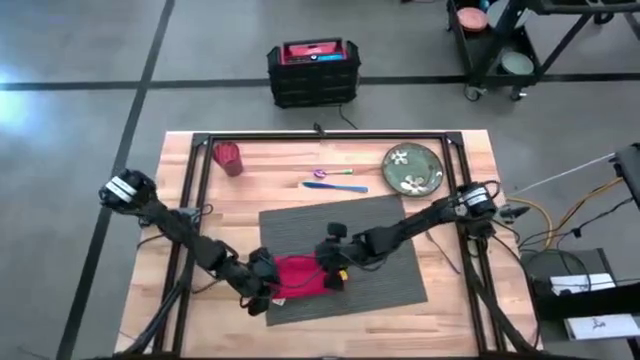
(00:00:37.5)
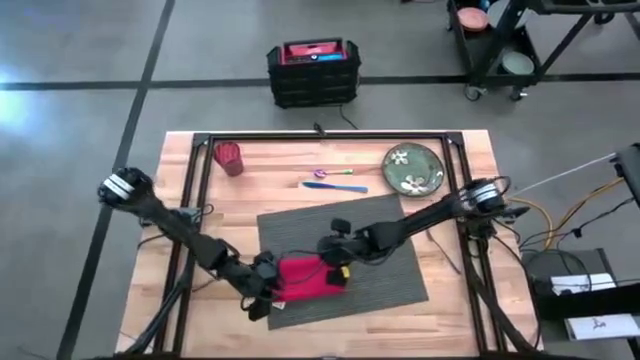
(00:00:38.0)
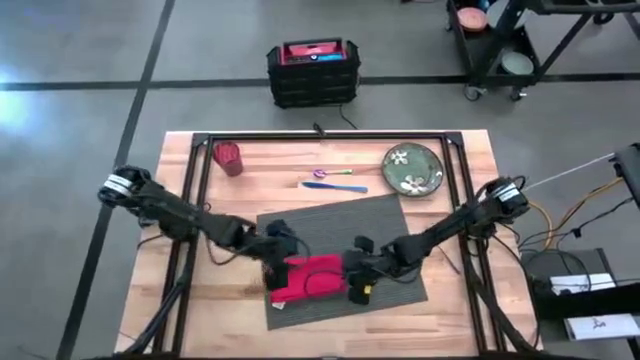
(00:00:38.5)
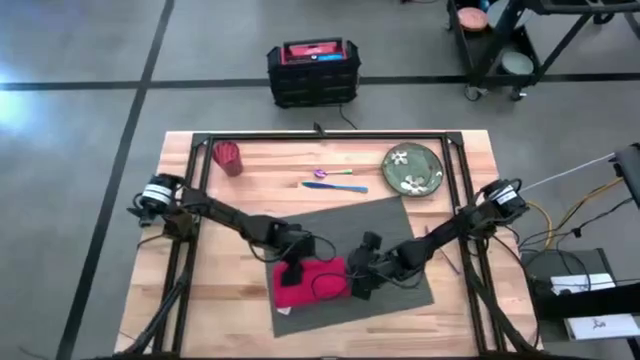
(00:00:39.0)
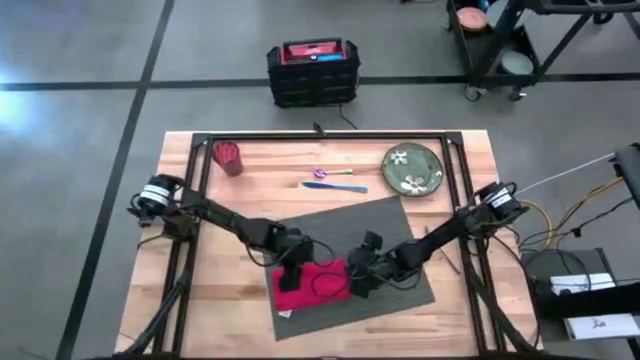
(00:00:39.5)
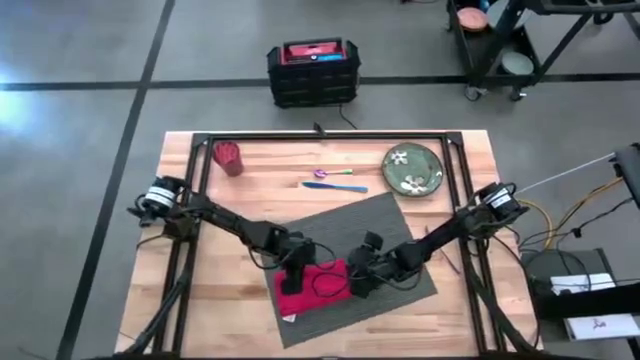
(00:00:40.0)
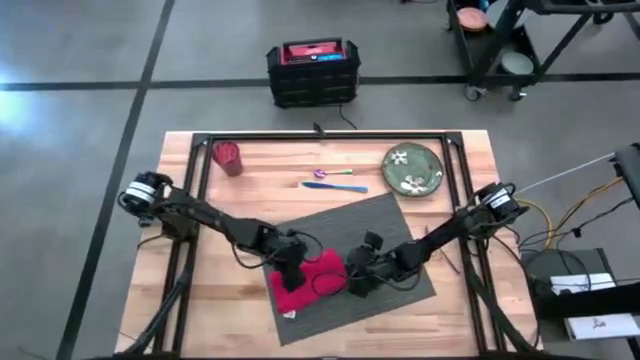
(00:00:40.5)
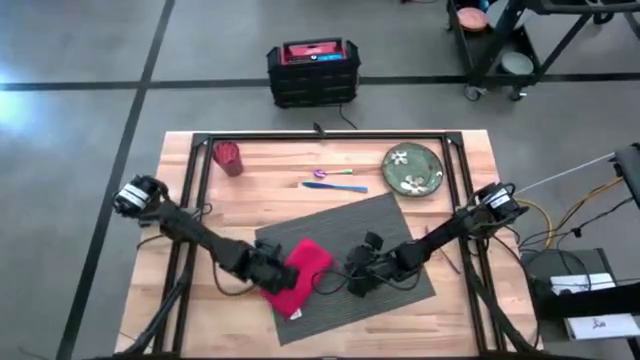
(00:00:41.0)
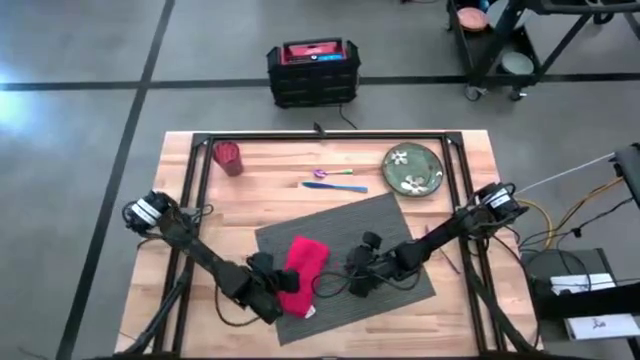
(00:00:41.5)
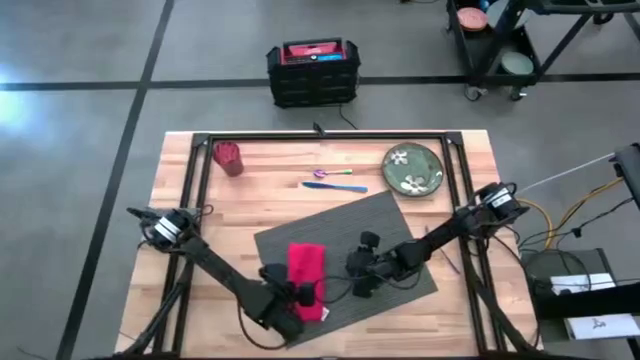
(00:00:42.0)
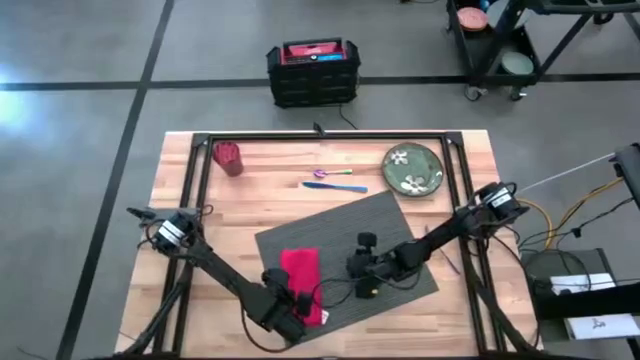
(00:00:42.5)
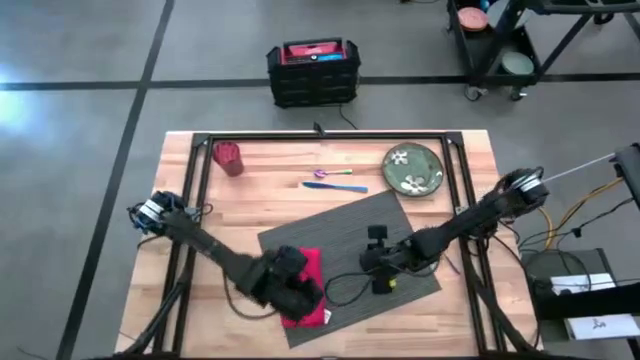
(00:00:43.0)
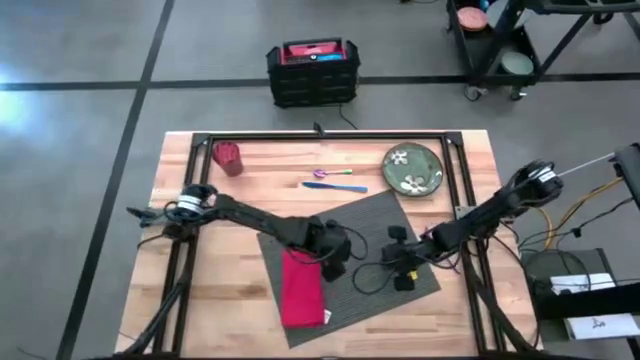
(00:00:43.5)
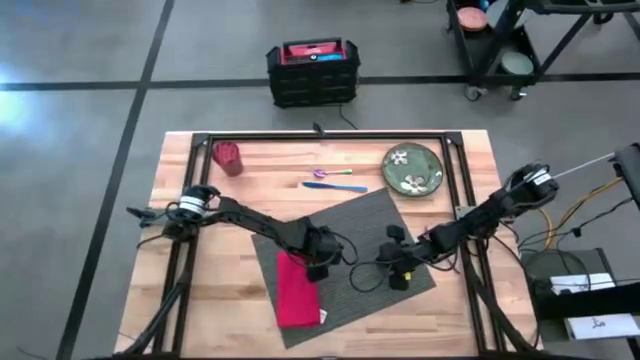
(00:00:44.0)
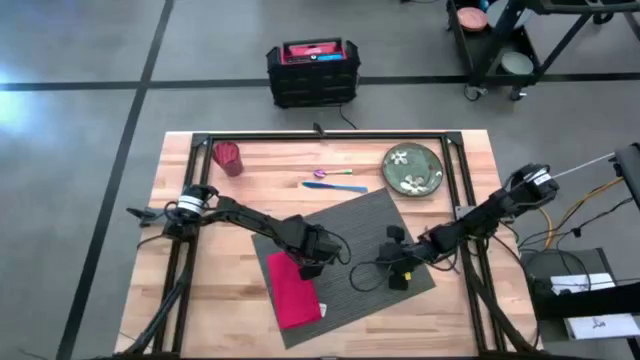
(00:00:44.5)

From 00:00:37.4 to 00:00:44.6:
Task: Set table place
Put the red napkin on the left side of the gray table mat

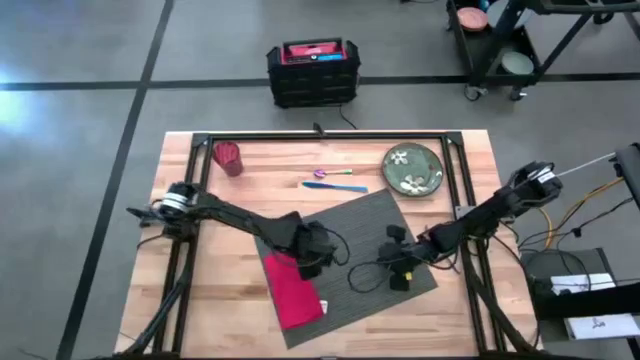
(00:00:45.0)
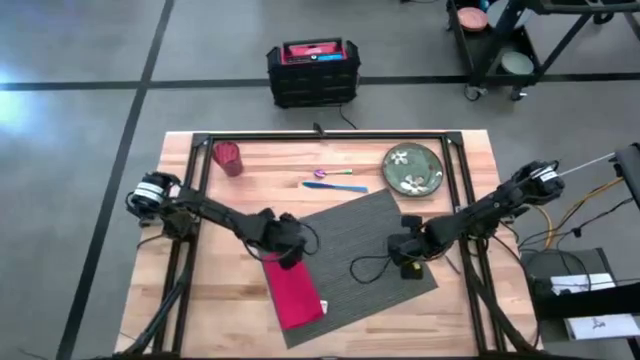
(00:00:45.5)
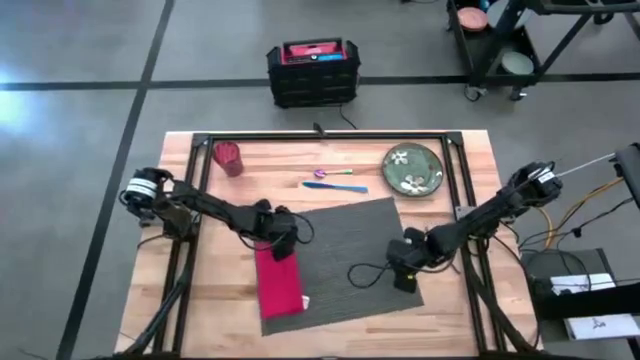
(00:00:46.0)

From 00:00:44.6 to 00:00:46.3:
Adjust the gray table mat on the table

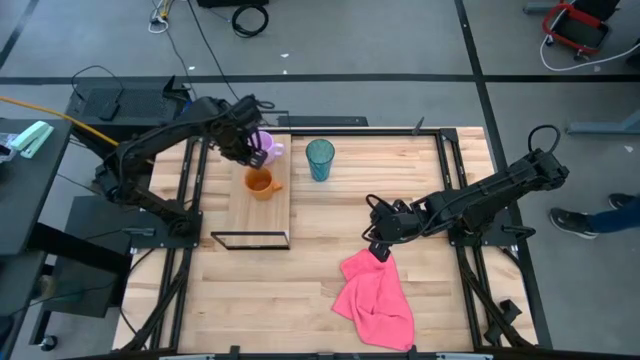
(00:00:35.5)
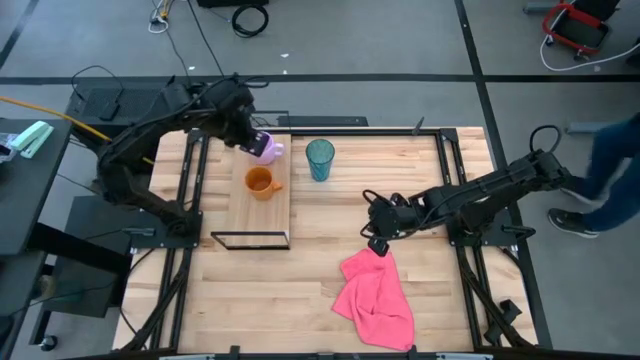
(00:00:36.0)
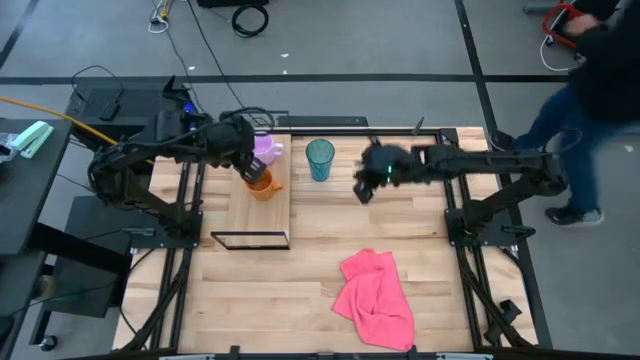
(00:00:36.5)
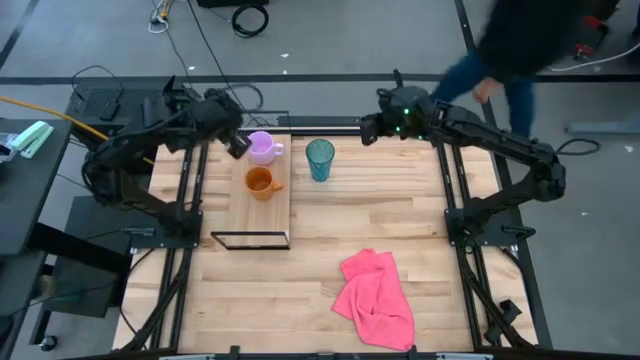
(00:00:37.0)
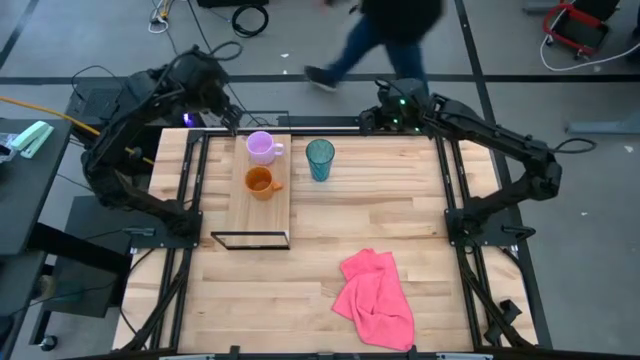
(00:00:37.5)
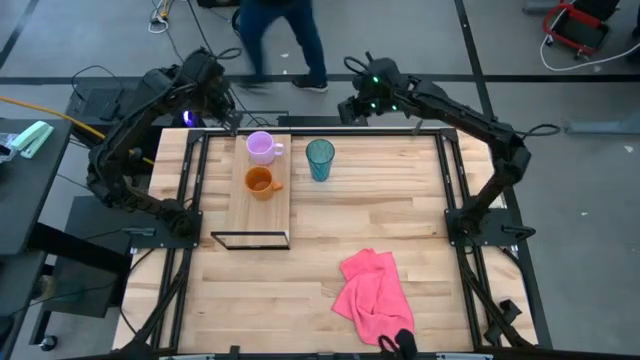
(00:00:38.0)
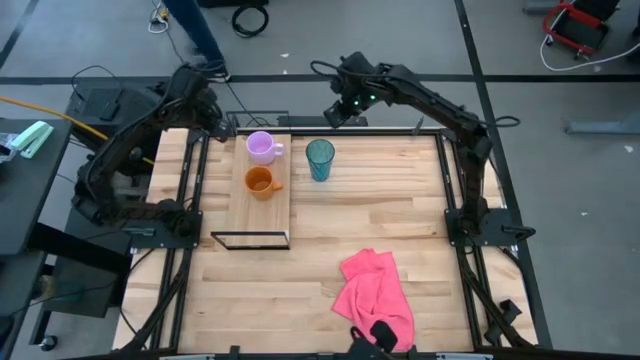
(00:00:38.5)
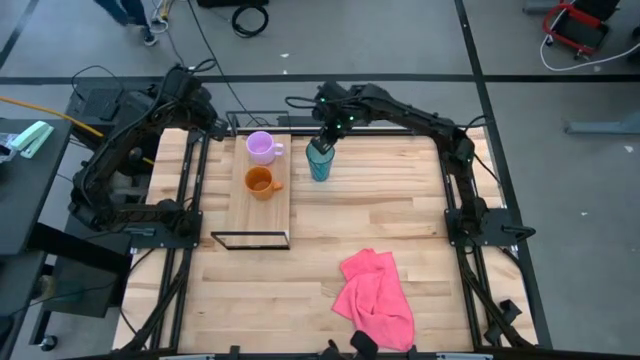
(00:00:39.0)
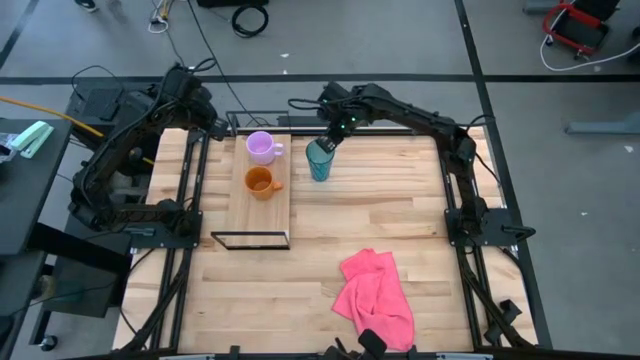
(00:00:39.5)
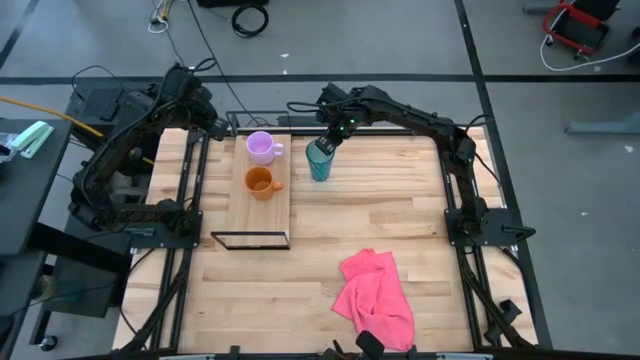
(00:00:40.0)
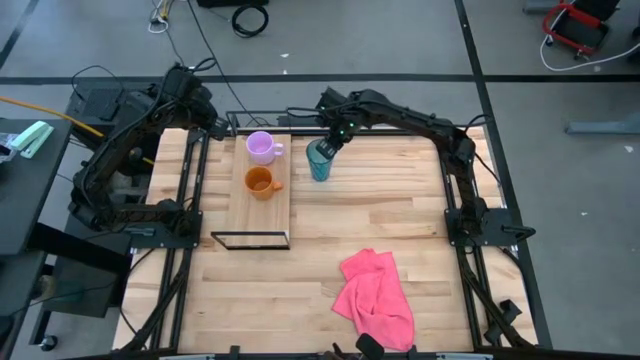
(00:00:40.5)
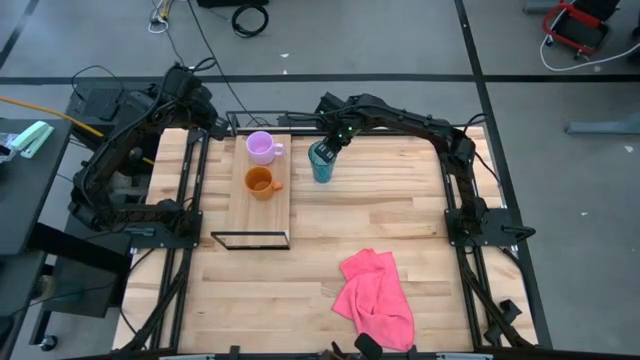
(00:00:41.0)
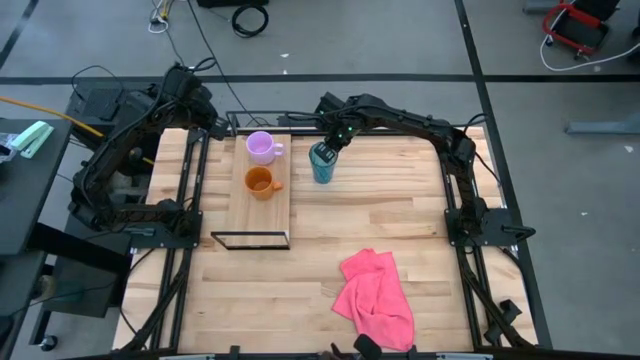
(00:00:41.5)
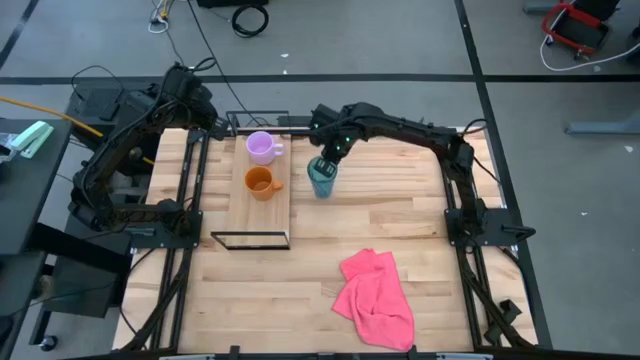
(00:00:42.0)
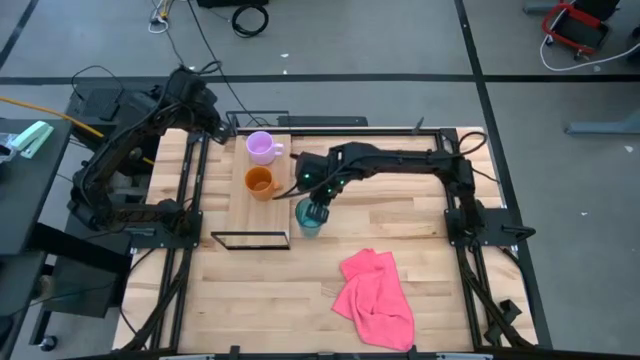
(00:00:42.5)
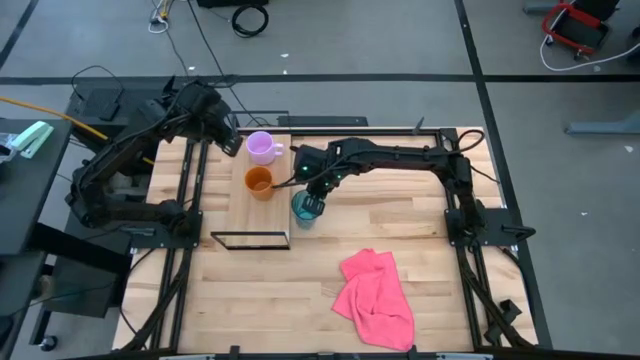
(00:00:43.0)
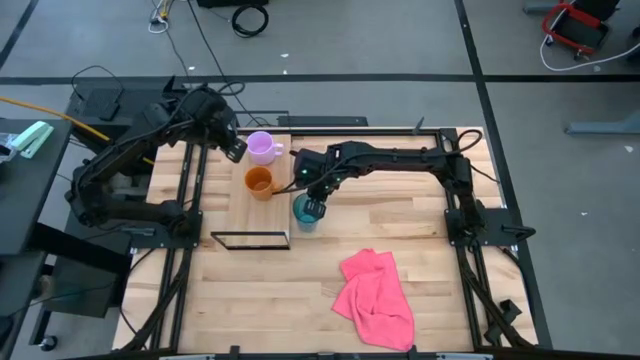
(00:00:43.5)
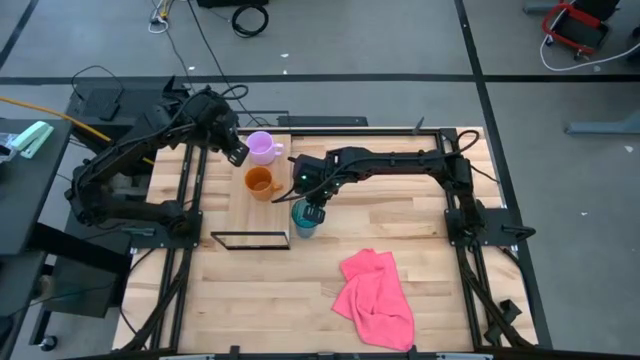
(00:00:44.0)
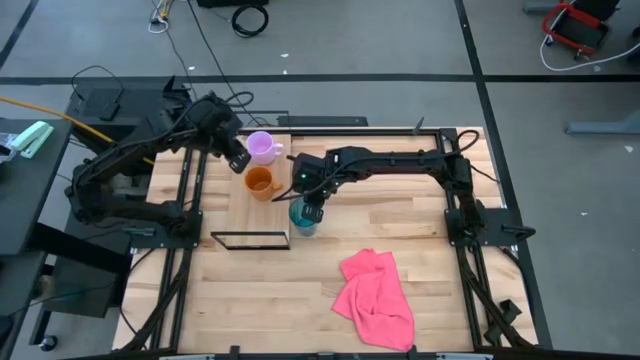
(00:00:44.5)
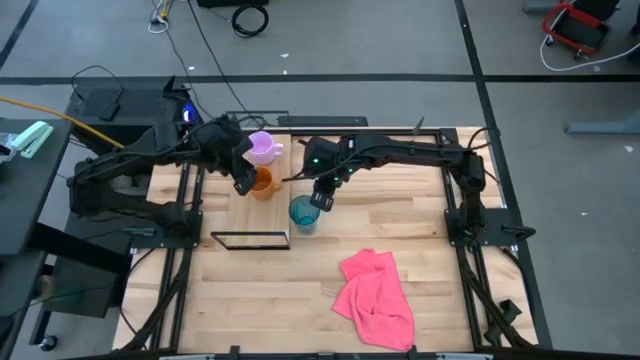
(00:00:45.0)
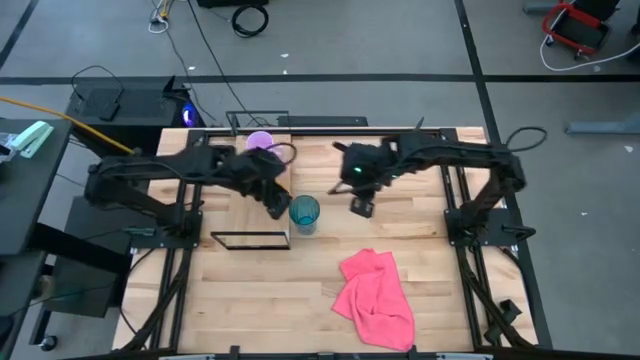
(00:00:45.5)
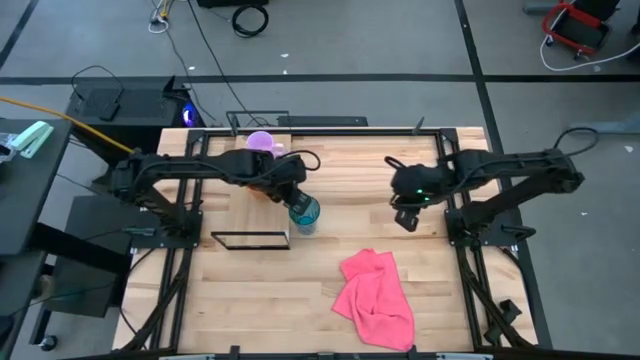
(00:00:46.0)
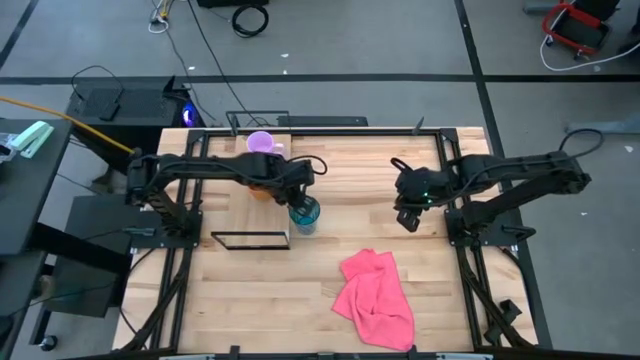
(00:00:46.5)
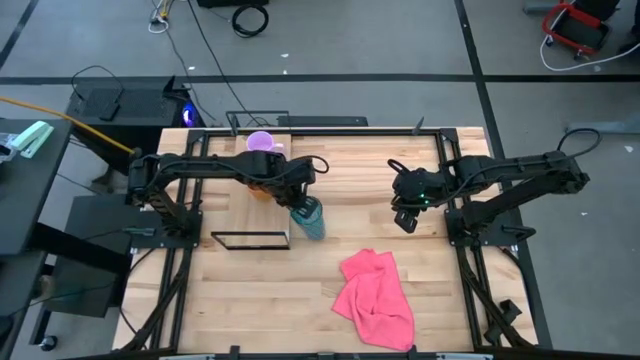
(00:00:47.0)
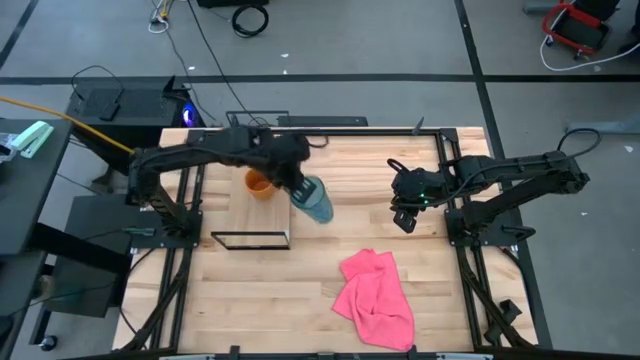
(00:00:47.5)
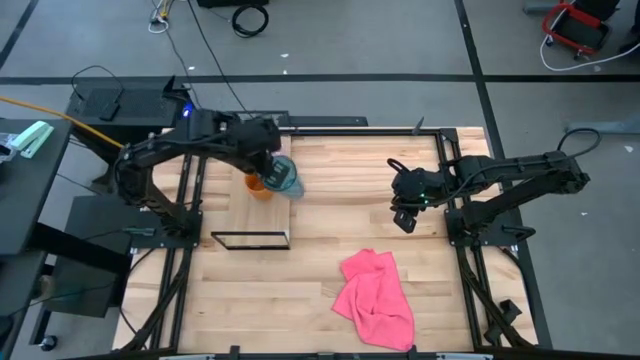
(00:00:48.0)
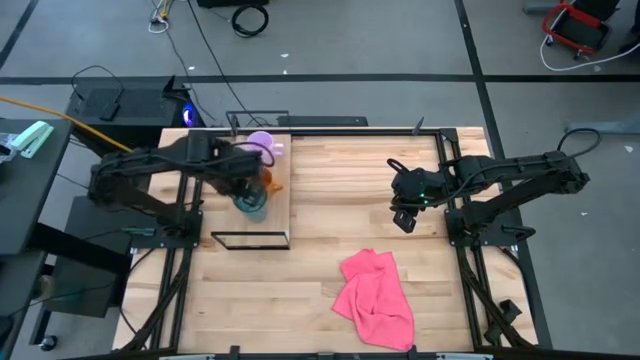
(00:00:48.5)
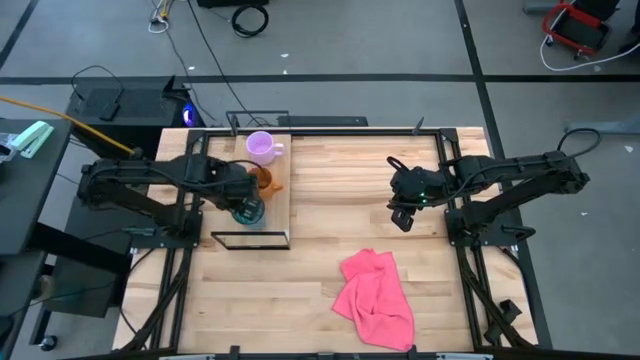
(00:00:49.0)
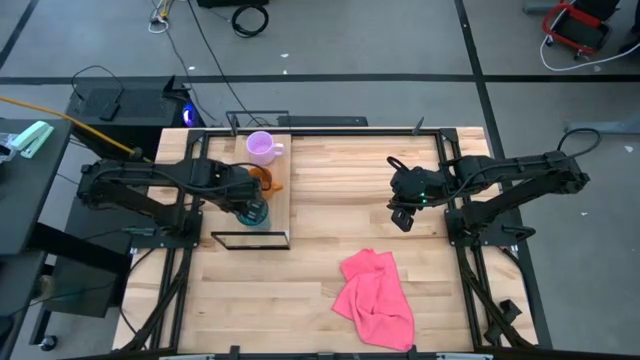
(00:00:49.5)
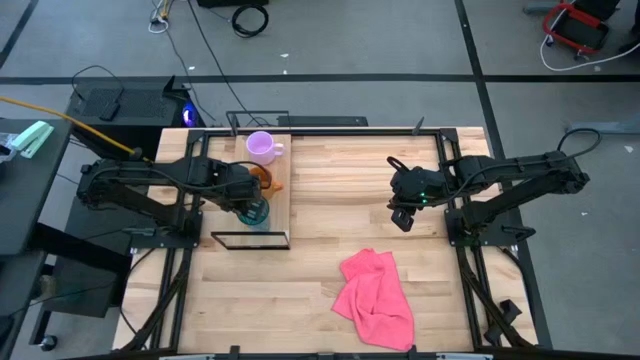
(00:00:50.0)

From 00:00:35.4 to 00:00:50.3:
Task: Stack small to large cups/mugs on shelf
Put the blue cup on the shelf
